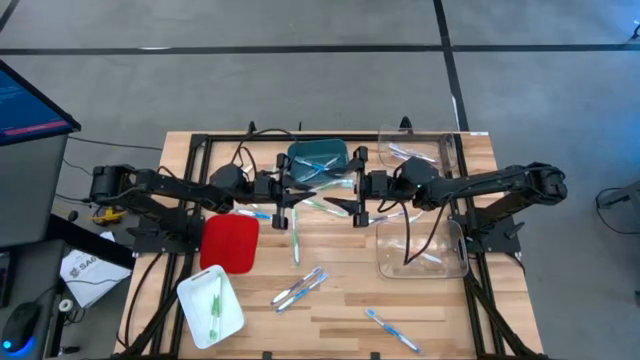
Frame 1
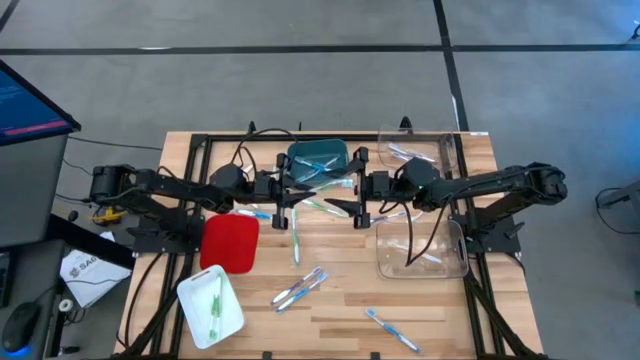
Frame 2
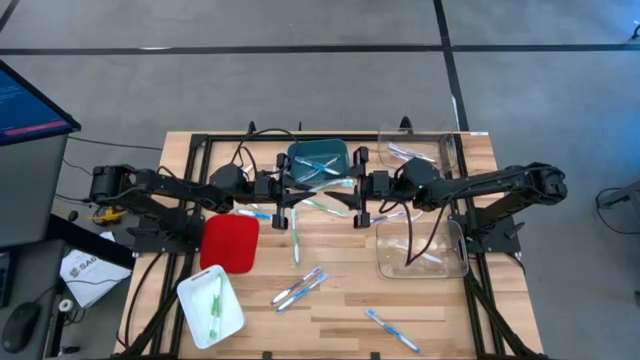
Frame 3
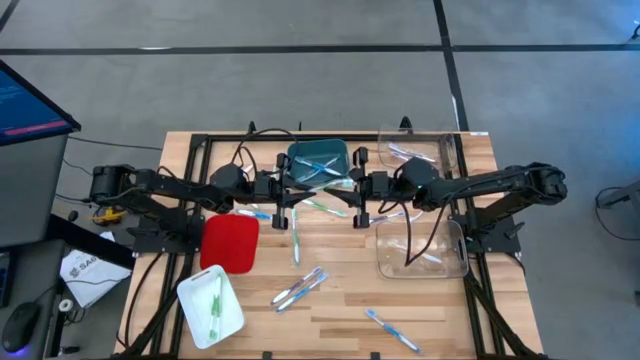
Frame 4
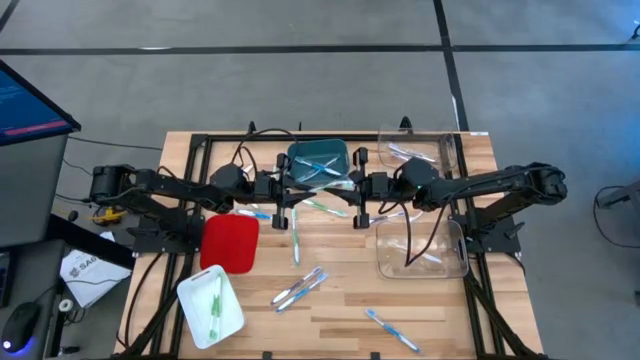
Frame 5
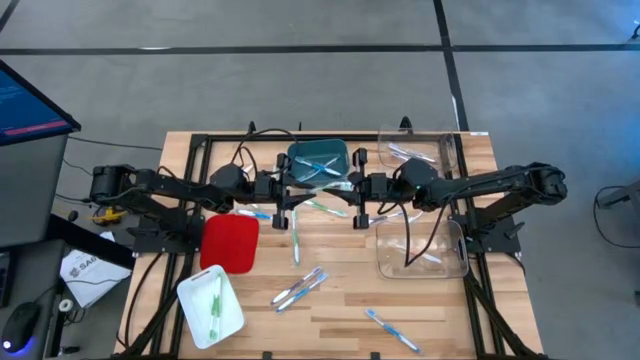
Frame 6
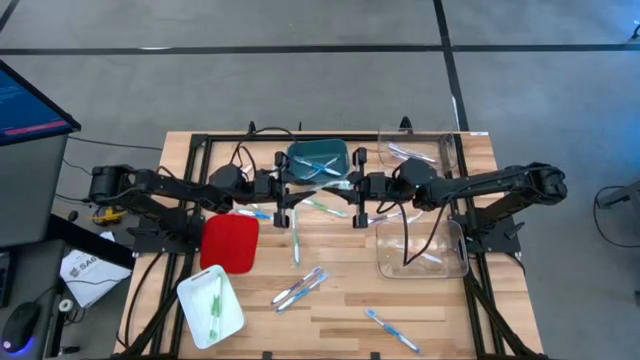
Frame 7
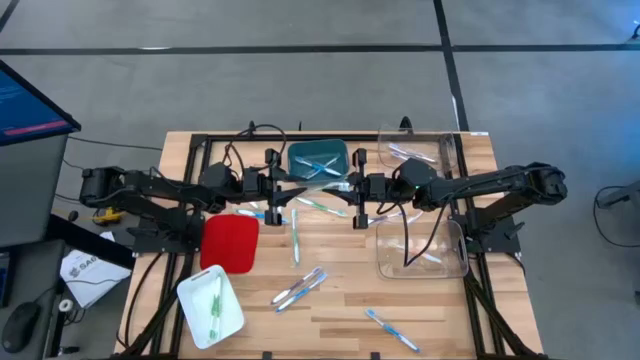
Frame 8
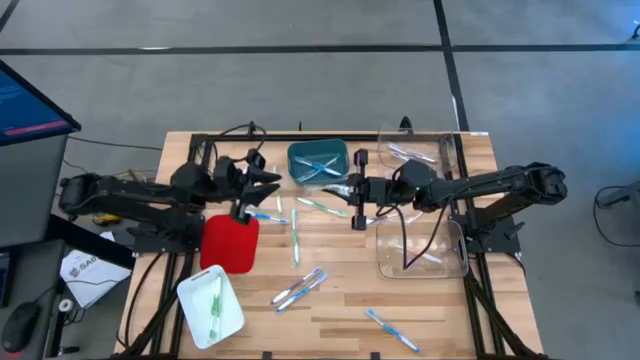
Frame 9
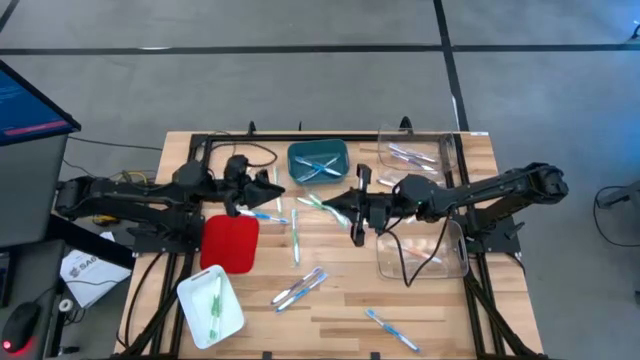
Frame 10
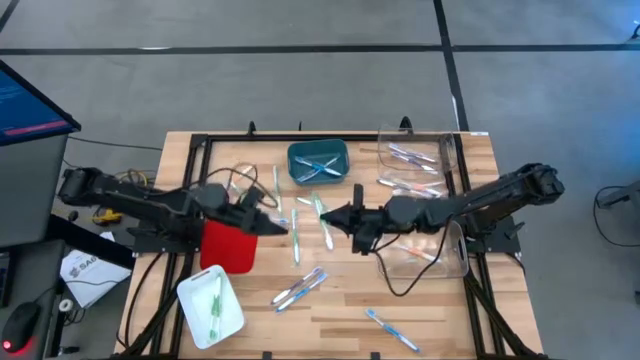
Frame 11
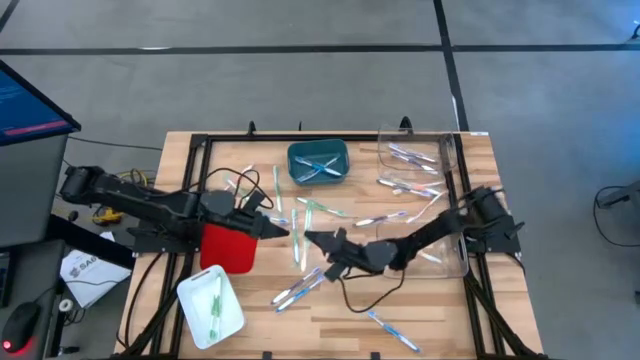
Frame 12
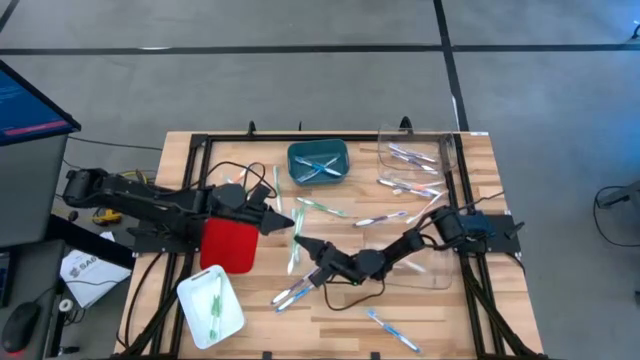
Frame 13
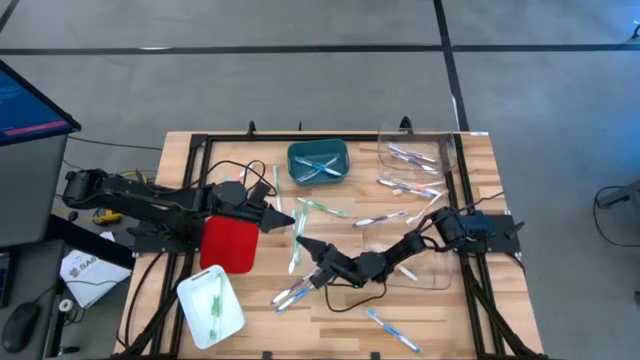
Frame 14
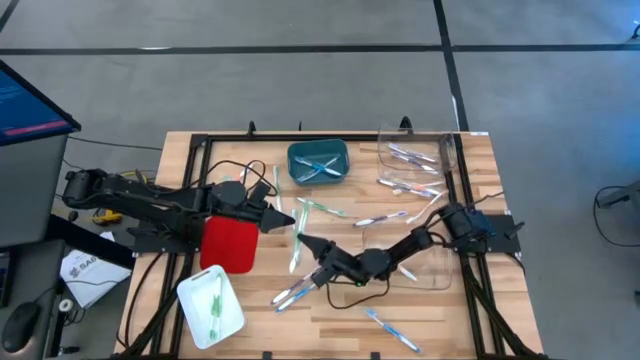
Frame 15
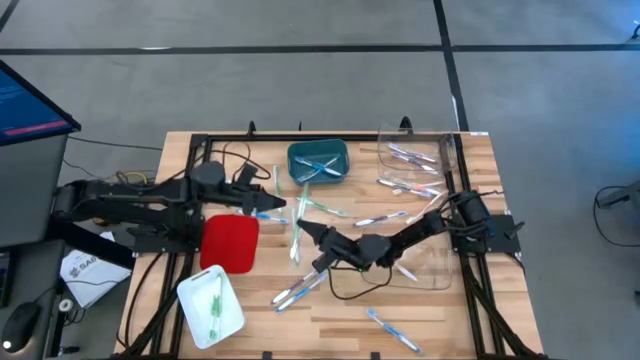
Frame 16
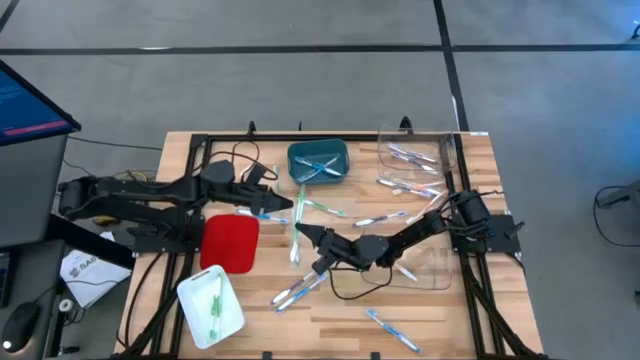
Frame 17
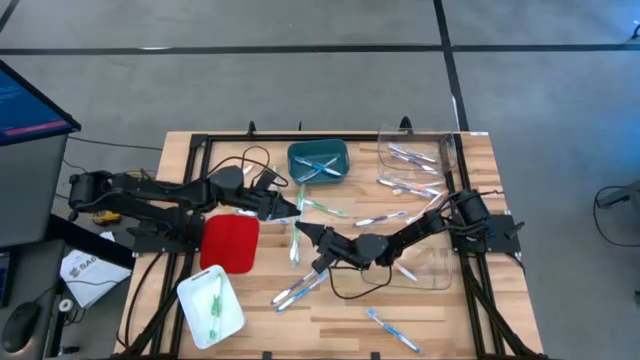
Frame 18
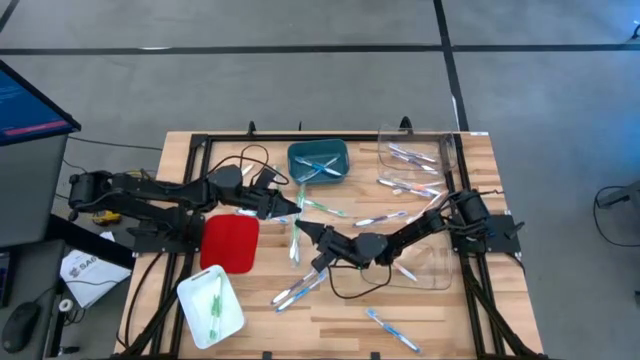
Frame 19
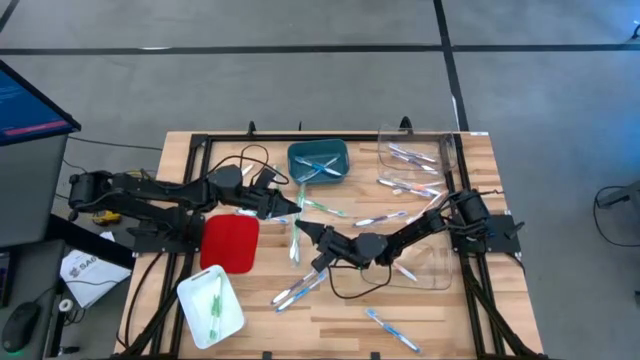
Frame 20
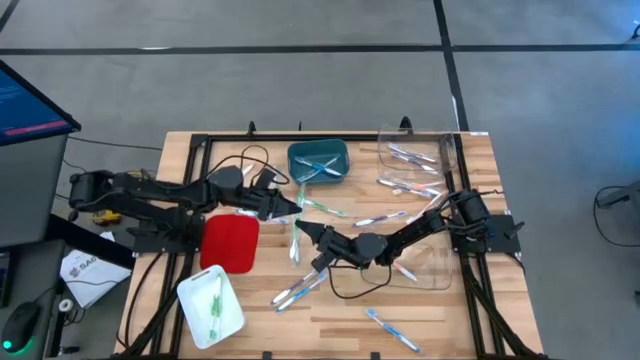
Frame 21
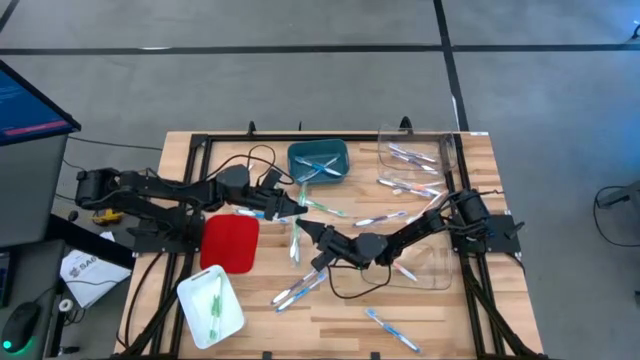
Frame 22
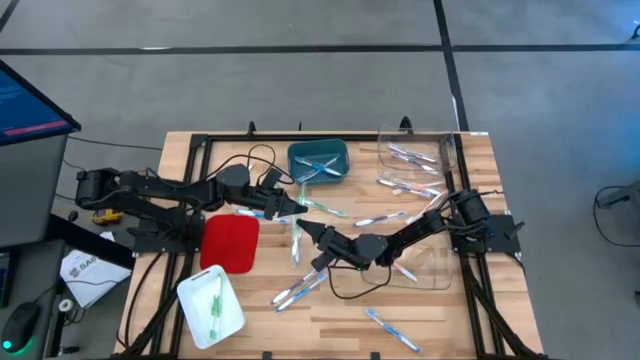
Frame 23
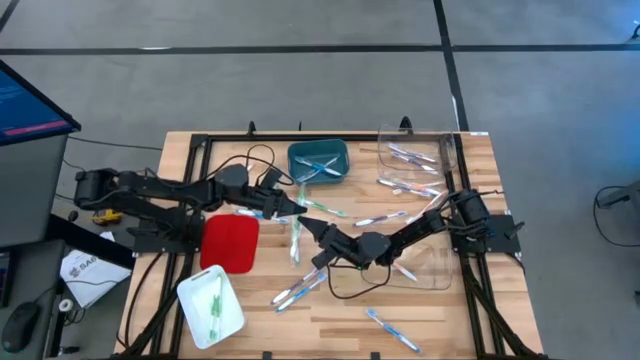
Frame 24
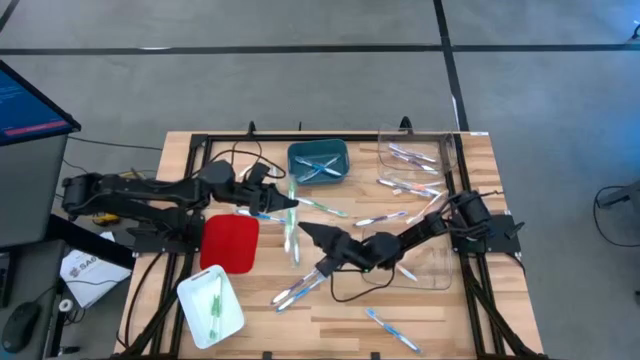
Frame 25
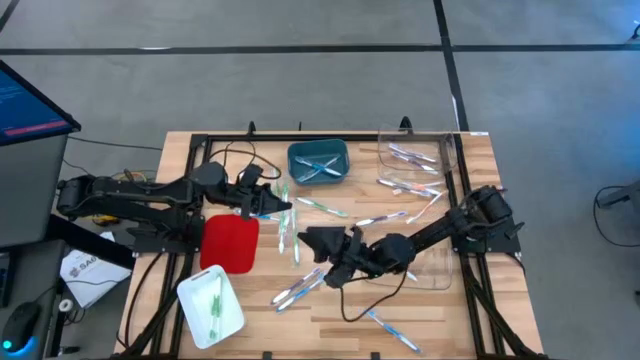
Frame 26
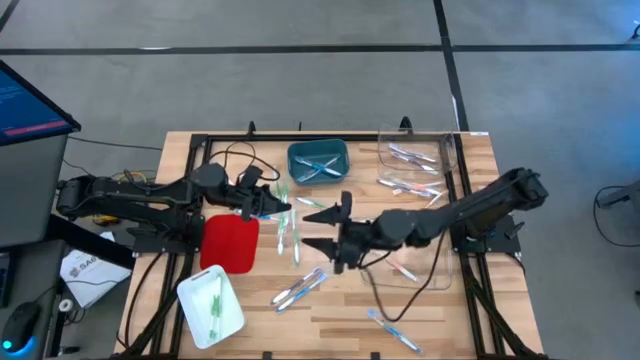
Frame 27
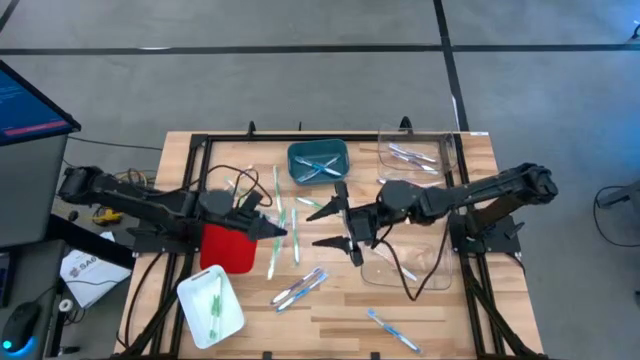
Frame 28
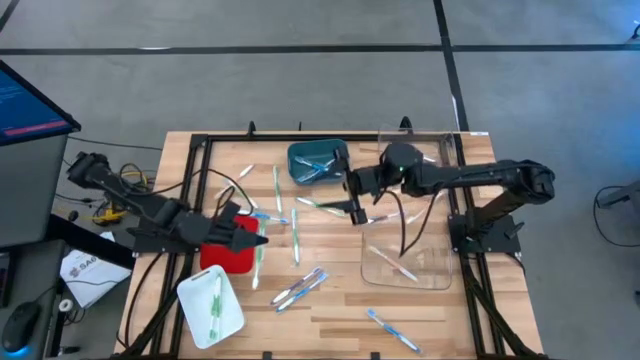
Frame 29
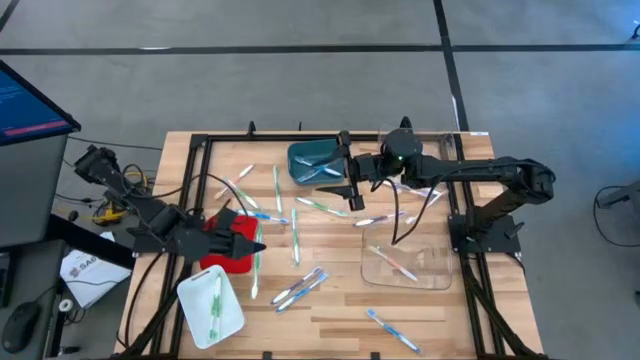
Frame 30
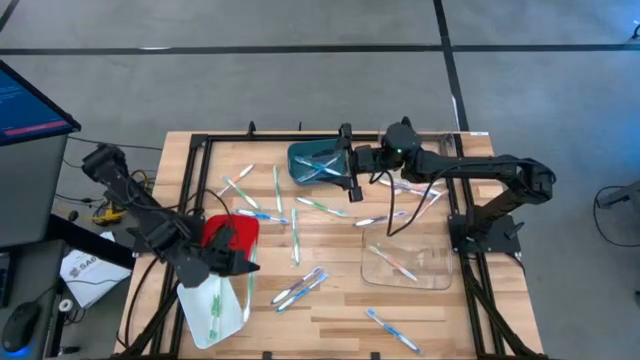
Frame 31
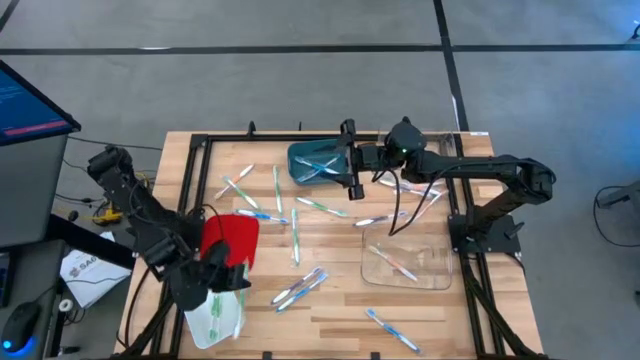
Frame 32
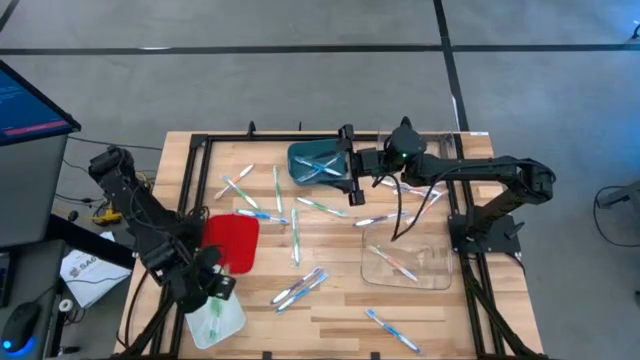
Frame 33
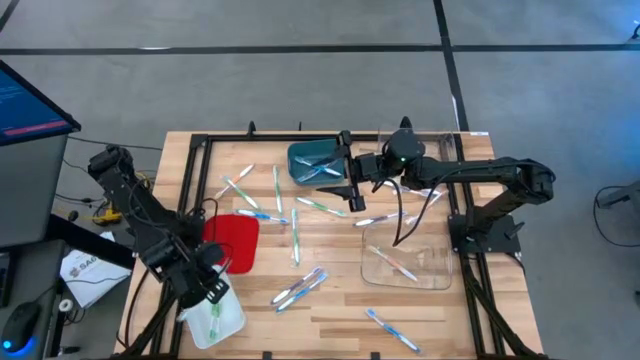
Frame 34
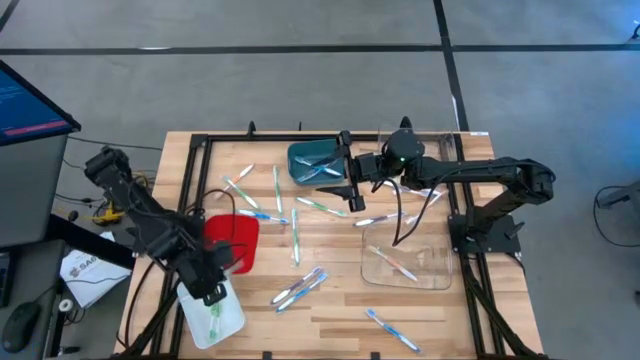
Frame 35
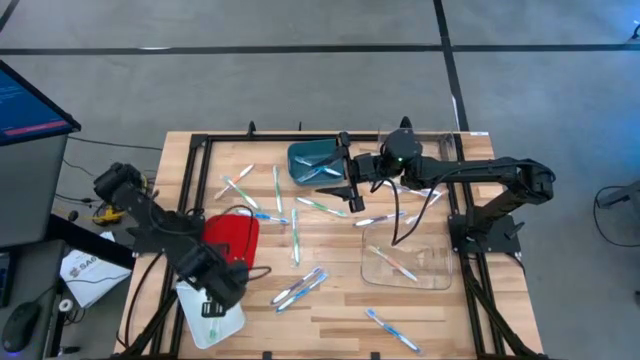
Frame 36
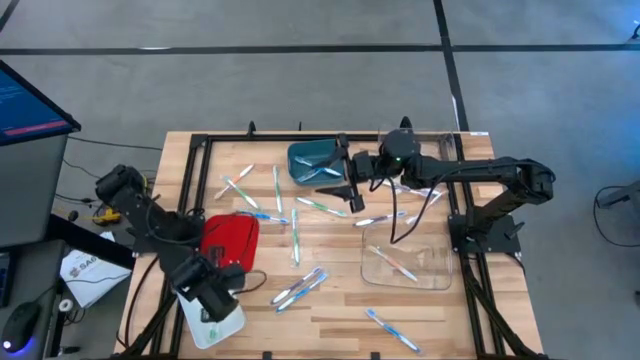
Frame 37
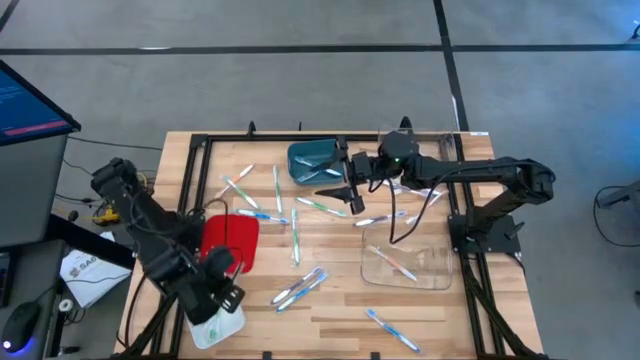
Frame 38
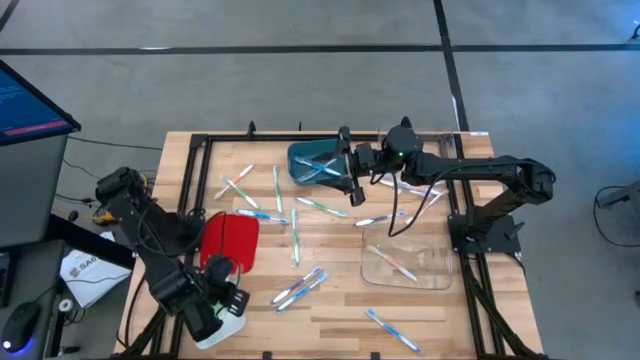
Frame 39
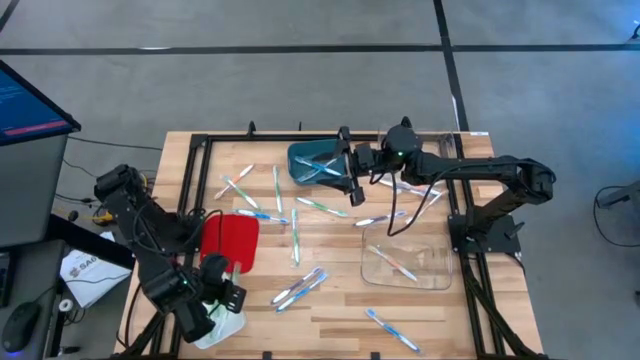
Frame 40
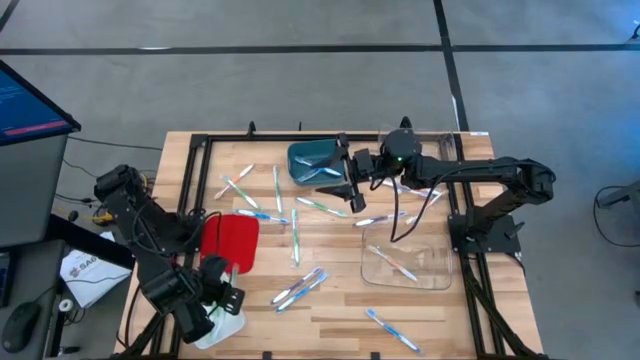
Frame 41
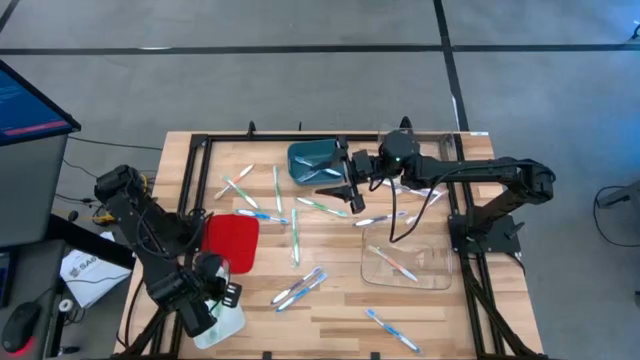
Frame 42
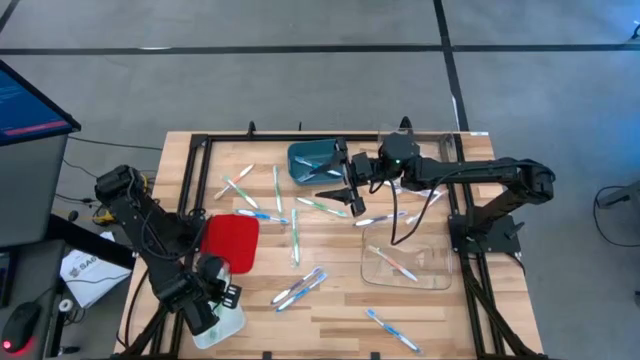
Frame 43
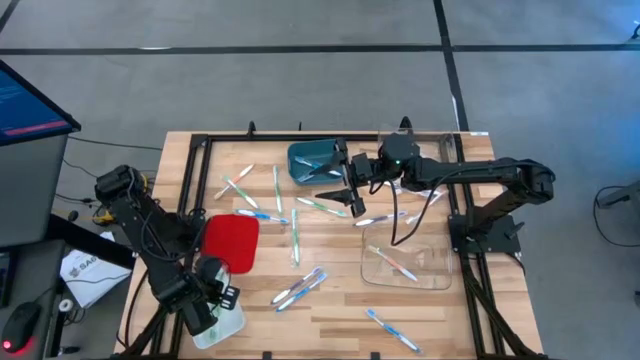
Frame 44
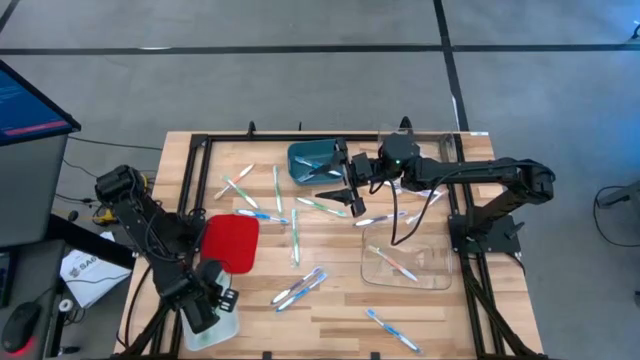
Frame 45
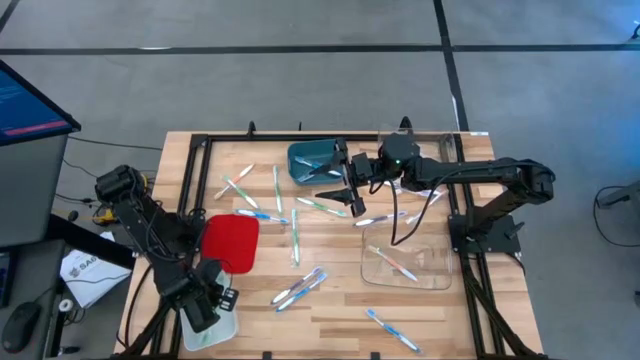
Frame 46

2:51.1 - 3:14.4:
Task: Pick & Place Toothbrushes
Put the green toothbrush into the white bin
